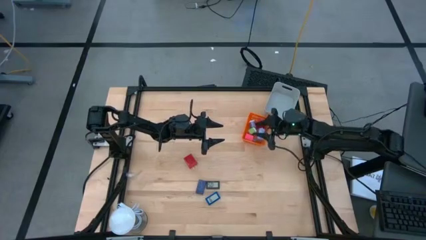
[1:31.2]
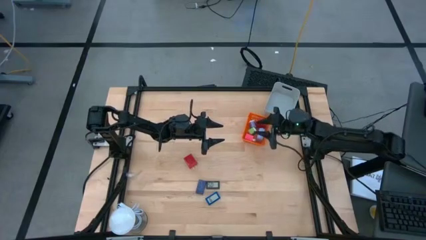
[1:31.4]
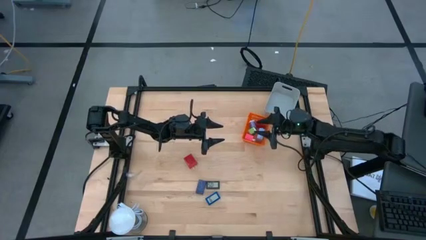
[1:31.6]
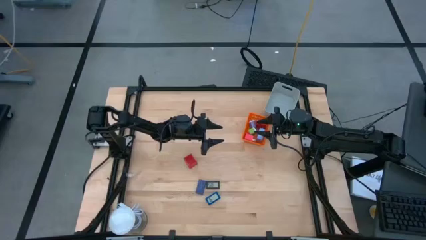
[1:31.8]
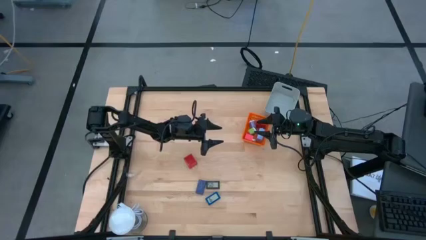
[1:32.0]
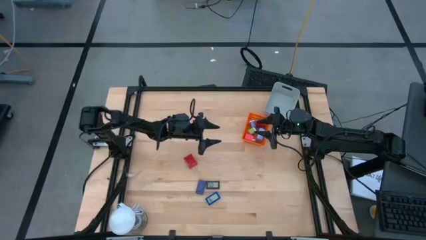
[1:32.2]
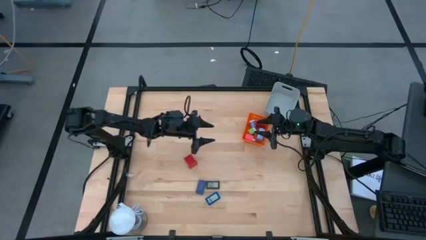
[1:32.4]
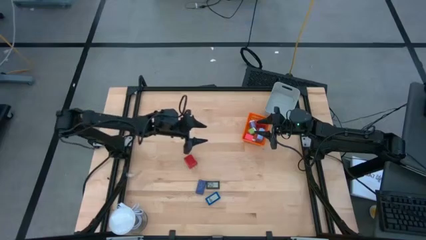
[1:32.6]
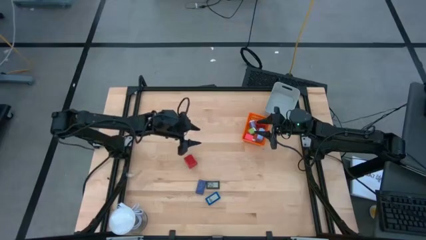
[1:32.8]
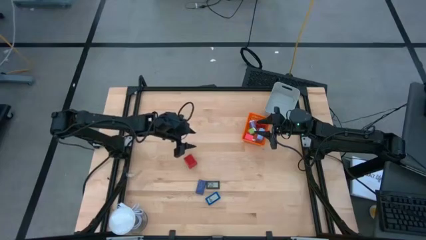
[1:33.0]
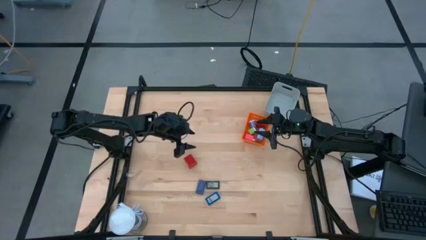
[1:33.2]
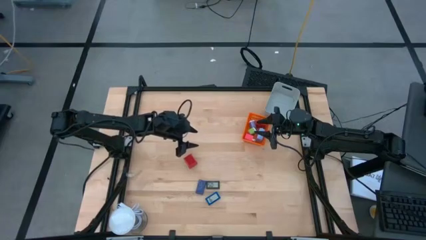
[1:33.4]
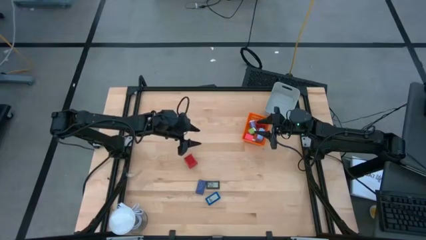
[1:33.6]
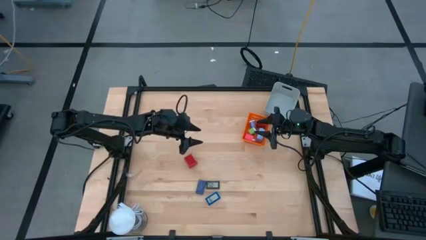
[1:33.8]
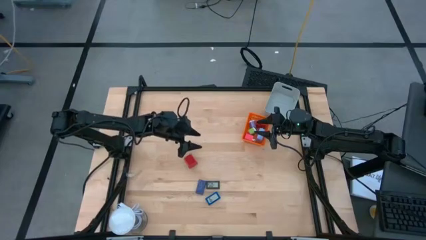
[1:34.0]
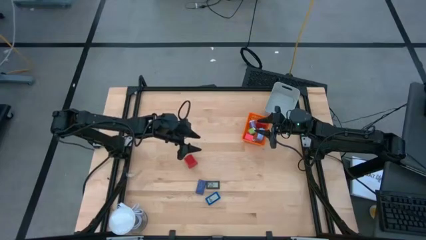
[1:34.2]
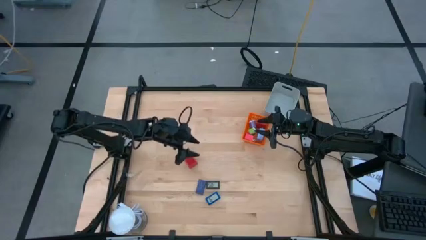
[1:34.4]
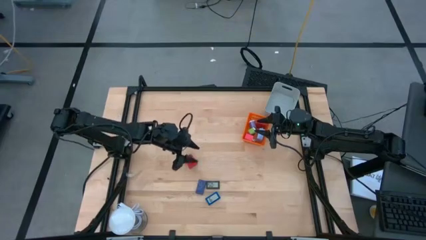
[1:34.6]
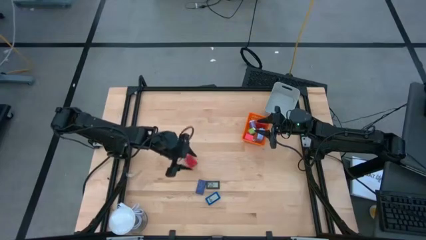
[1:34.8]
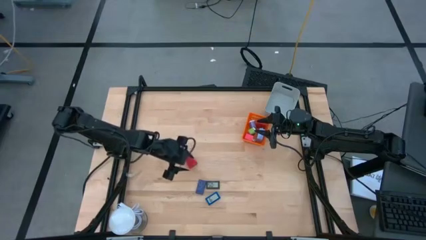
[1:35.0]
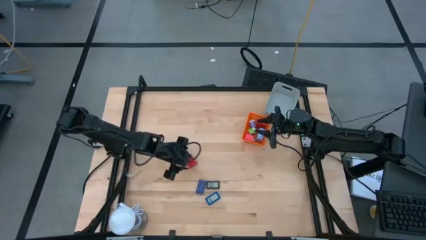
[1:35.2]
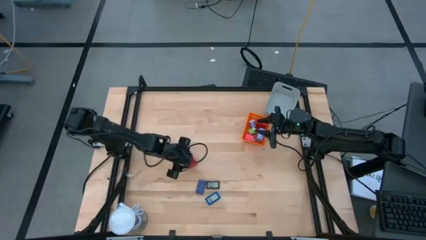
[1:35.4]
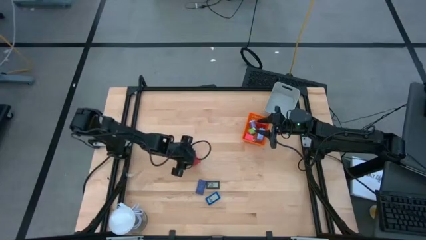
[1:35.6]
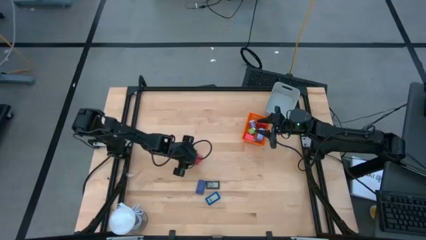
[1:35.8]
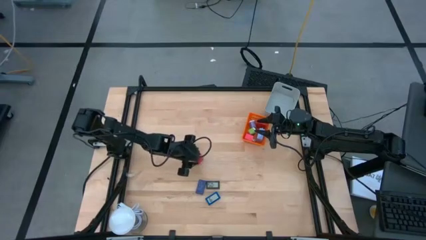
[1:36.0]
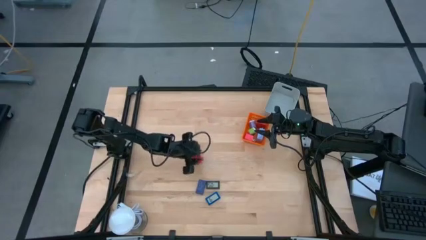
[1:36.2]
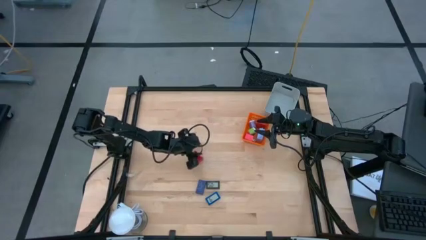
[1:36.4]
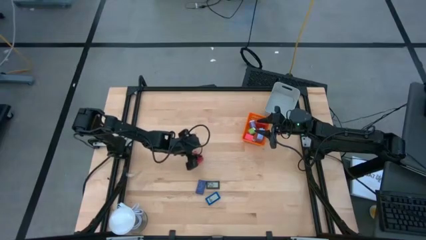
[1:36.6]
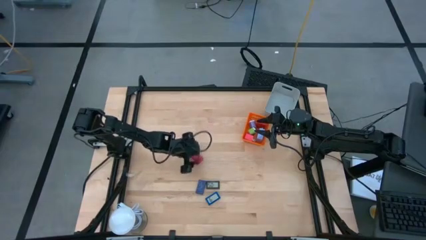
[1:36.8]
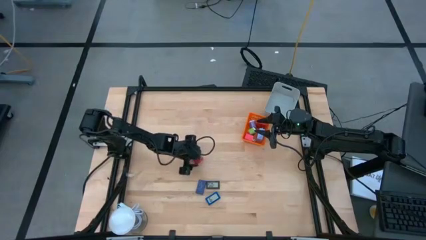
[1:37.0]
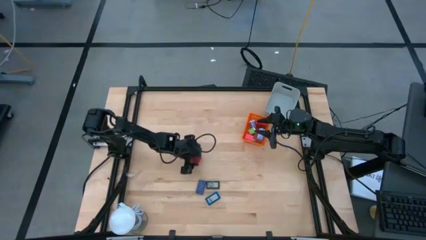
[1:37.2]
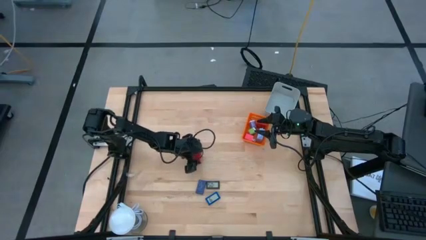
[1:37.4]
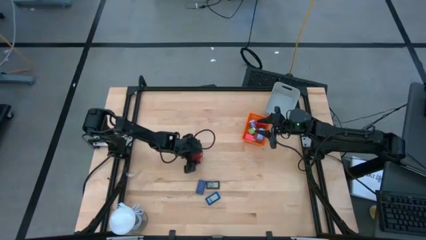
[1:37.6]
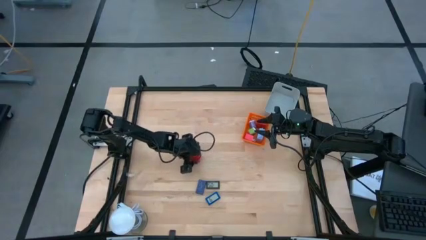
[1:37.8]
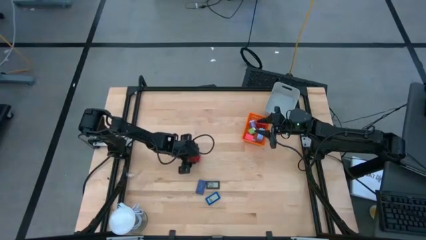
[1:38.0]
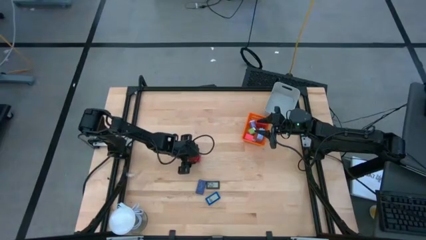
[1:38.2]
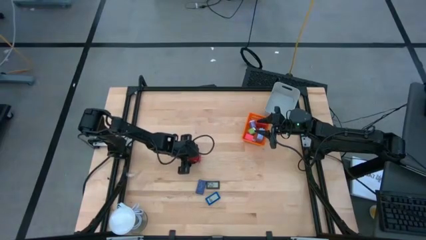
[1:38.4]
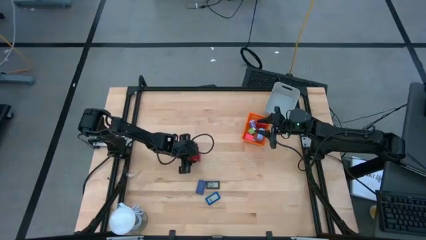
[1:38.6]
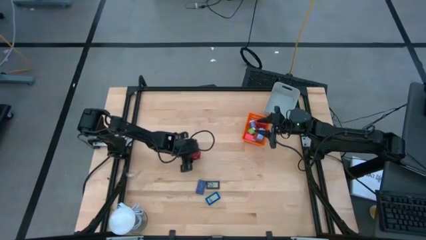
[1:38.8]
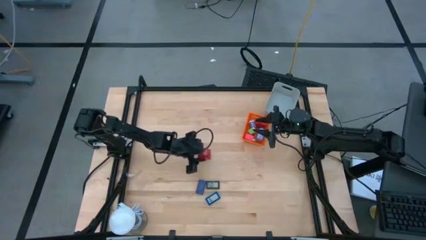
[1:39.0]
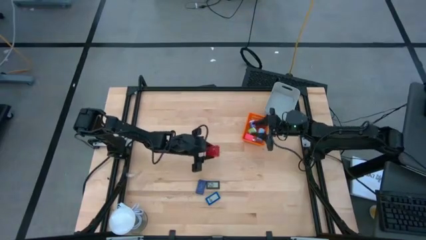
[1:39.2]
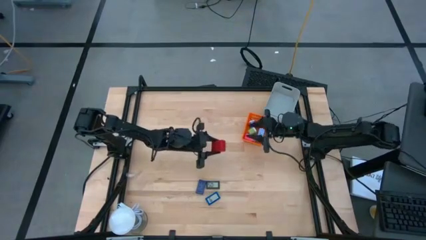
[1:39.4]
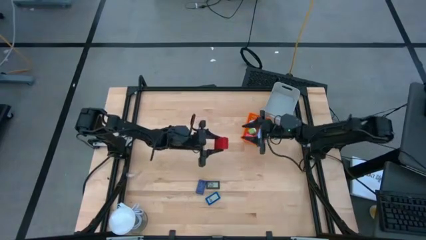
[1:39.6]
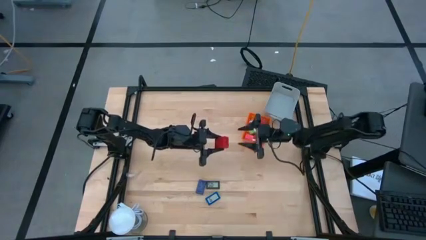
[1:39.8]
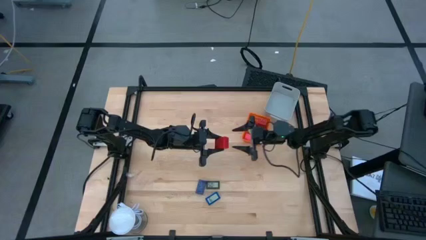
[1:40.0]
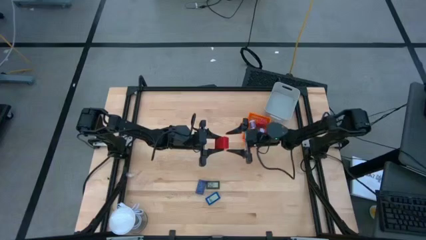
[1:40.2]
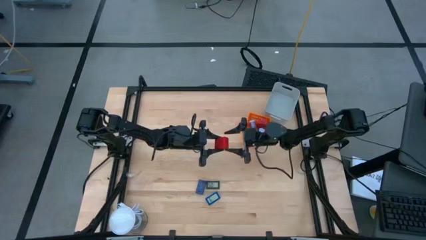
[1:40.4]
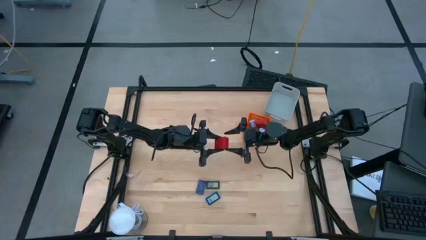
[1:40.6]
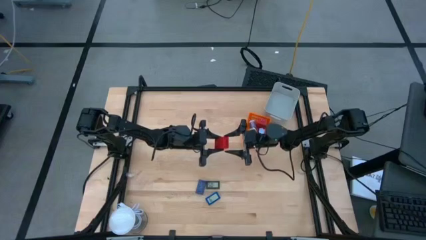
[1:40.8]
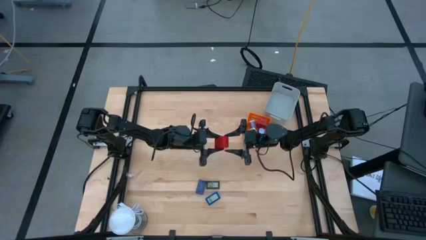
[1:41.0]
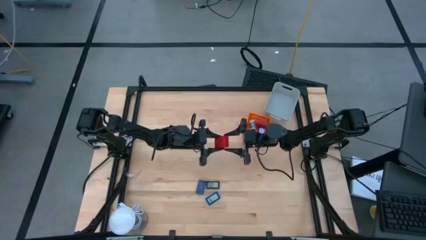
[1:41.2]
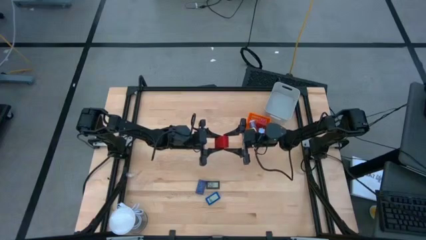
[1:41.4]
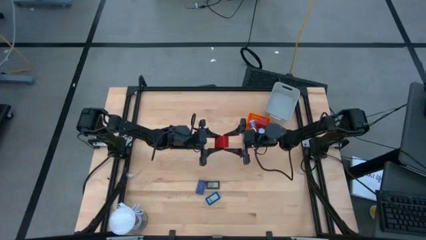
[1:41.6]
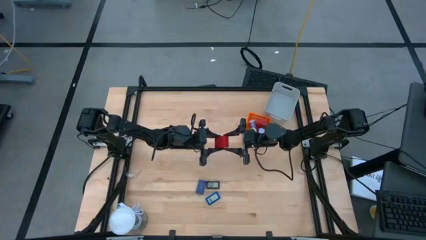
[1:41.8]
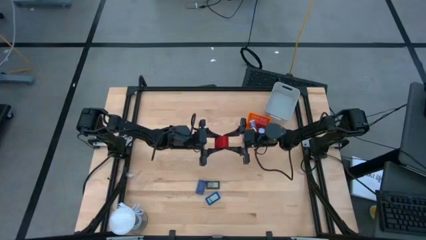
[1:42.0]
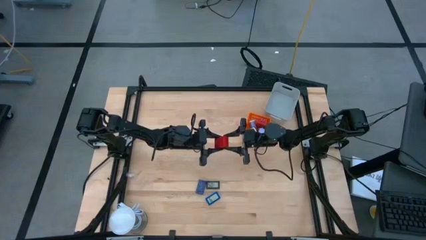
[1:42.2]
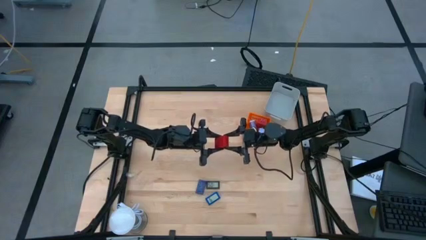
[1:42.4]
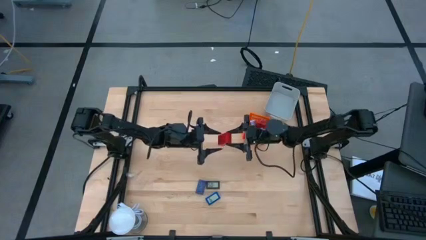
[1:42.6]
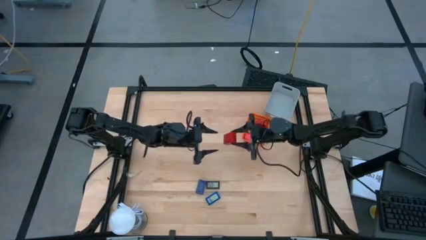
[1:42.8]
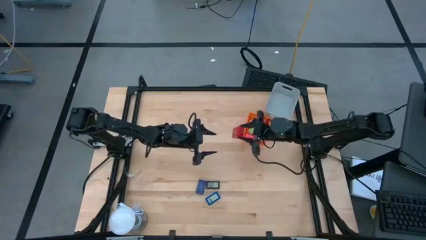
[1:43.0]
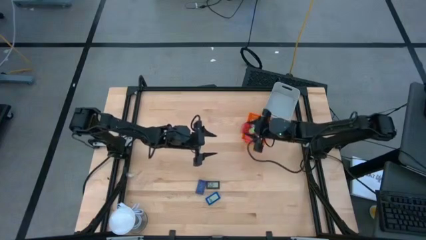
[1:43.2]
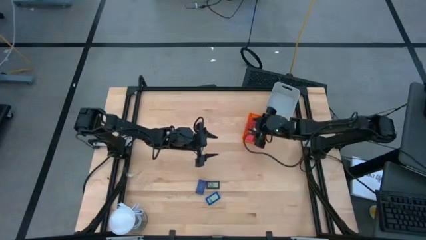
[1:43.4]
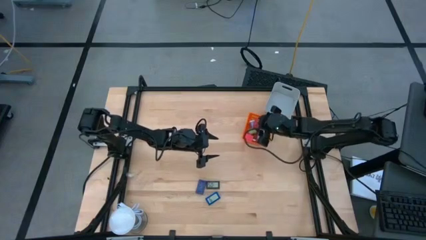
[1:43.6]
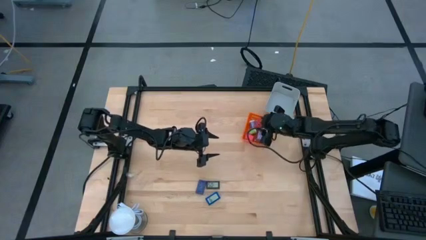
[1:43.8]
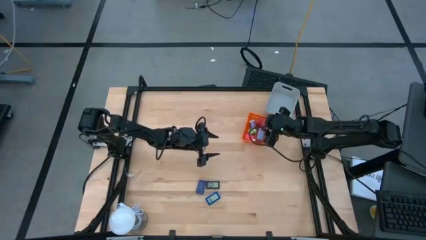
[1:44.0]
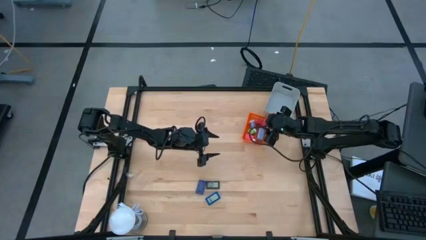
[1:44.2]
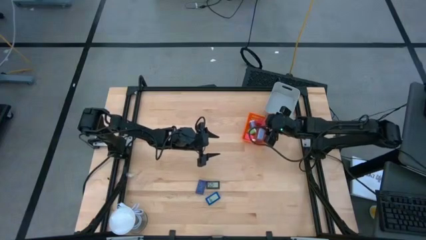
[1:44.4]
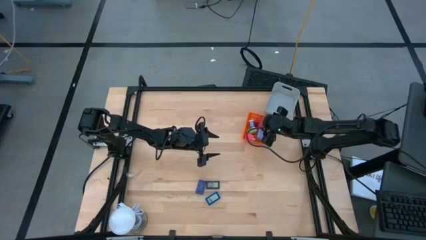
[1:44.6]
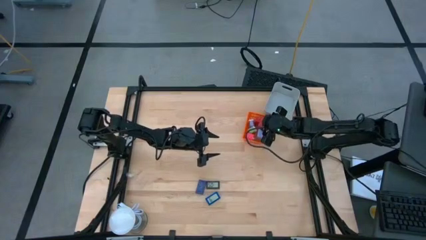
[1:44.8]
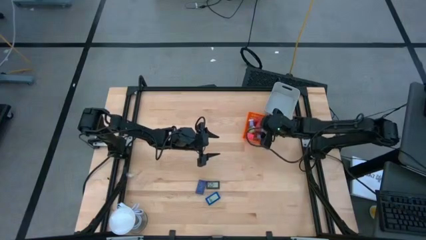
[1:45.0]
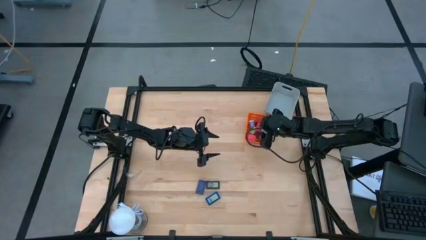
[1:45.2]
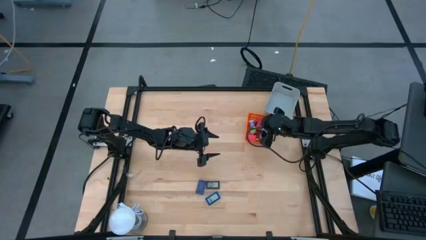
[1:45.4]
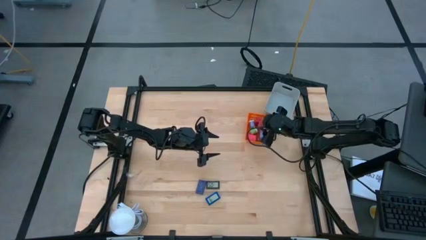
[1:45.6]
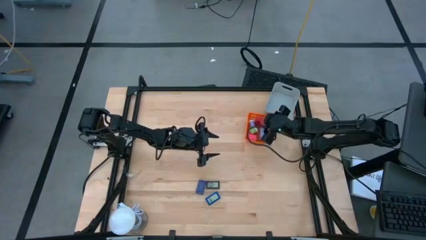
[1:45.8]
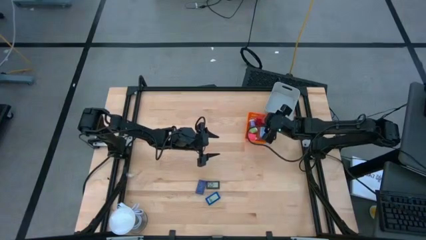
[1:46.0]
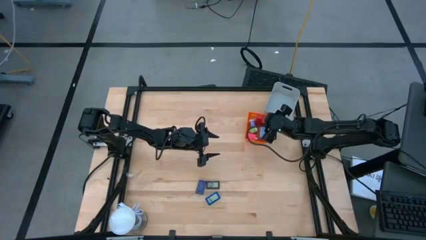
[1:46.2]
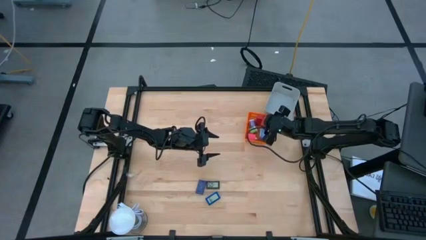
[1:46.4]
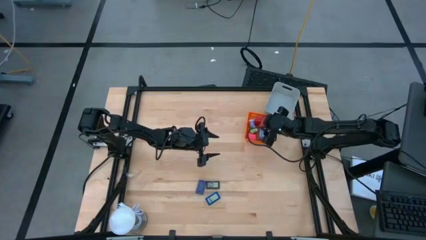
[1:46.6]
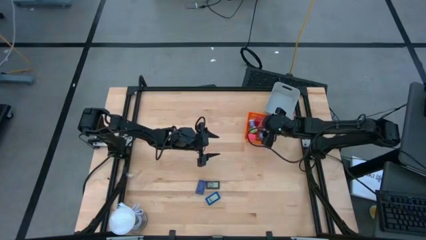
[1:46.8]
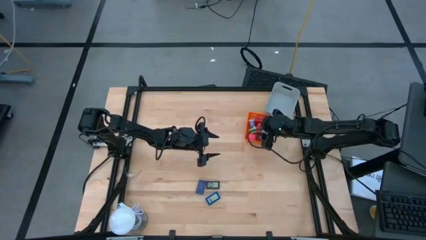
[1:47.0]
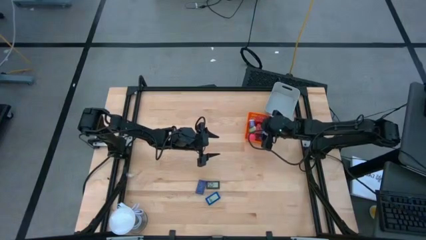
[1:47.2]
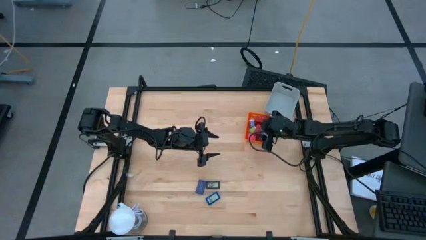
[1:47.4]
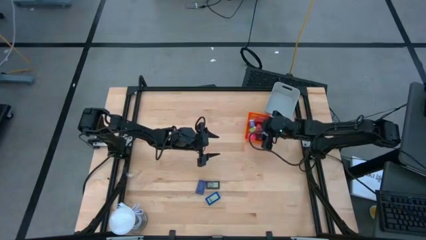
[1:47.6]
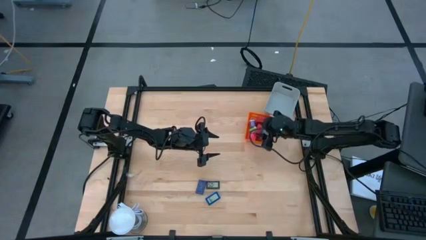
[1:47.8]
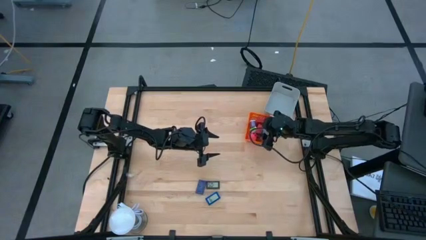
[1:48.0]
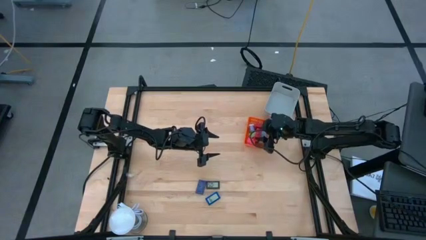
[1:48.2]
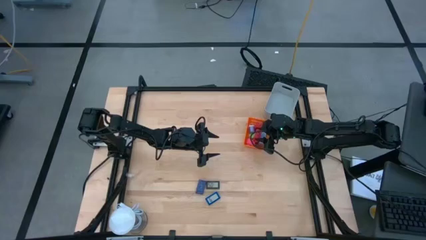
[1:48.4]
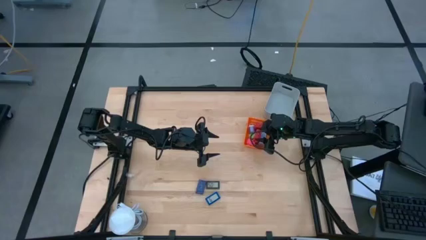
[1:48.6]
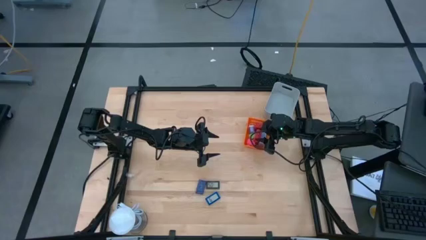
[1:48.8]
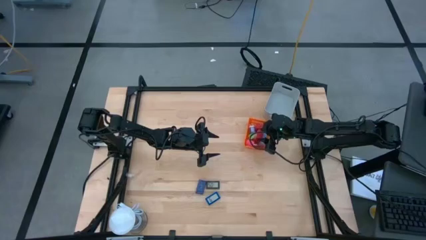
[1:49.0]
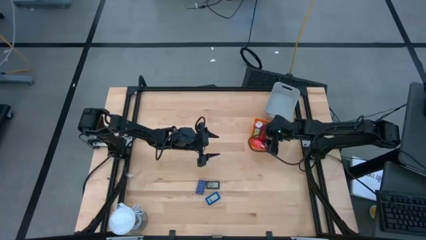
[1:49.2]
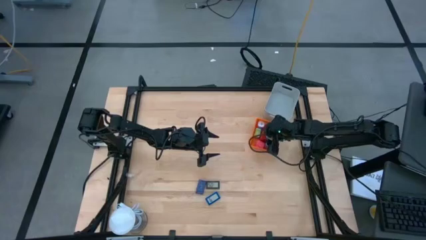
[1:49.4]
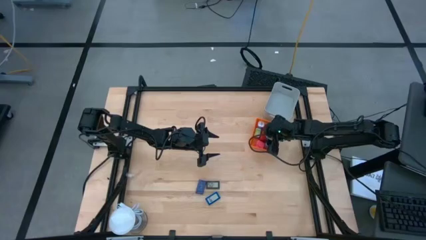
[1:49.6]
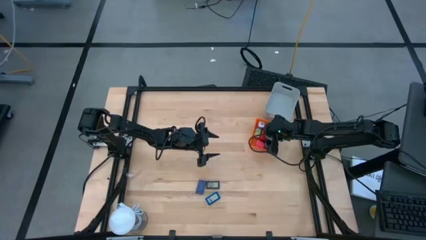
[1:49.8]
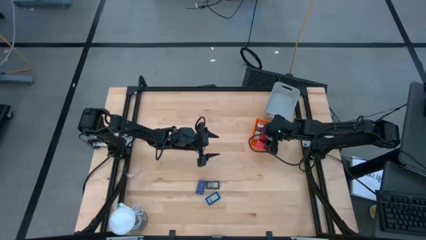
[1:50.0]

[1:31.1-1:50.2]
Task: Pick & Place Office items
Put the red charger adapter into the orange bin
